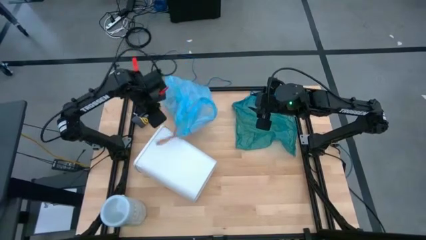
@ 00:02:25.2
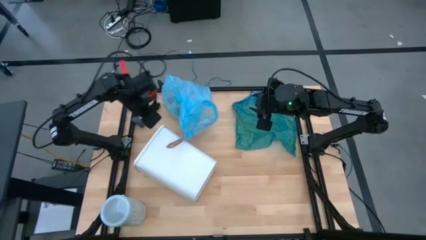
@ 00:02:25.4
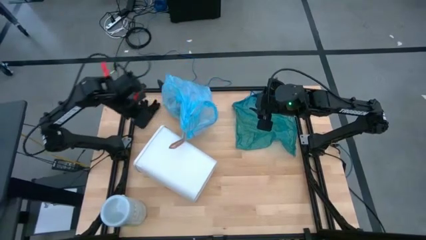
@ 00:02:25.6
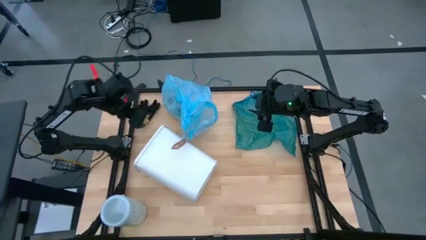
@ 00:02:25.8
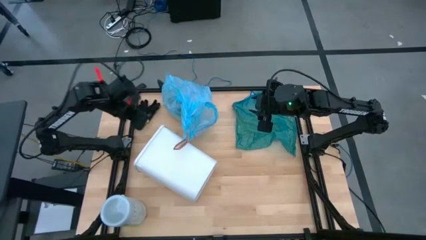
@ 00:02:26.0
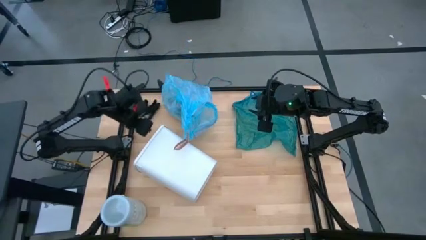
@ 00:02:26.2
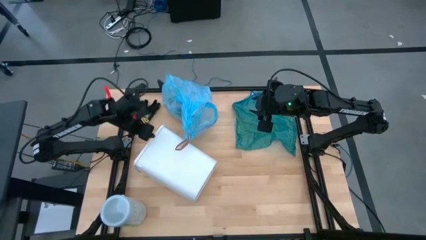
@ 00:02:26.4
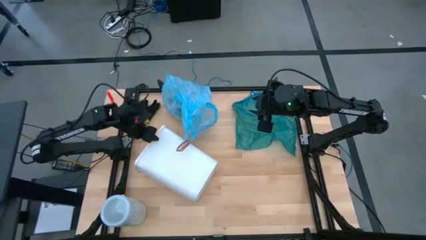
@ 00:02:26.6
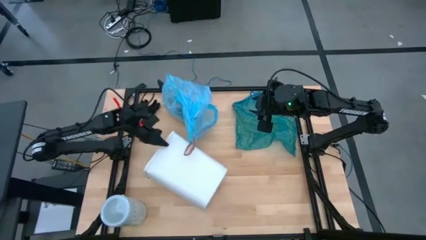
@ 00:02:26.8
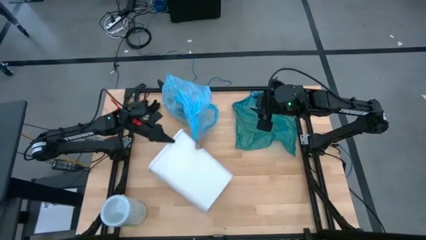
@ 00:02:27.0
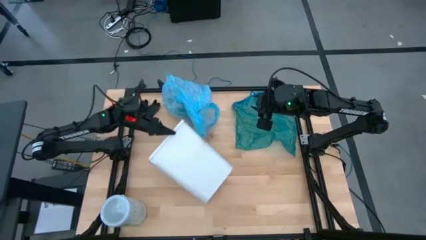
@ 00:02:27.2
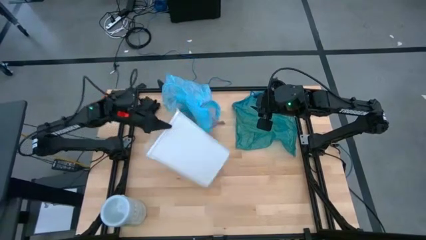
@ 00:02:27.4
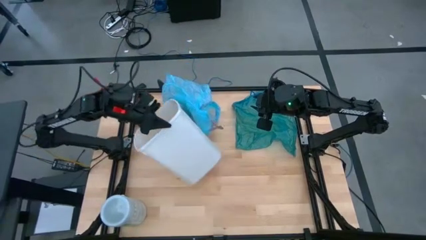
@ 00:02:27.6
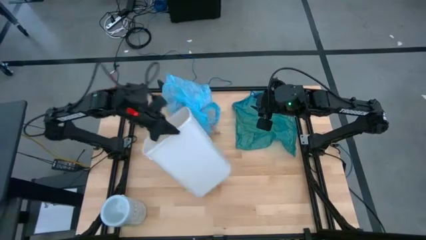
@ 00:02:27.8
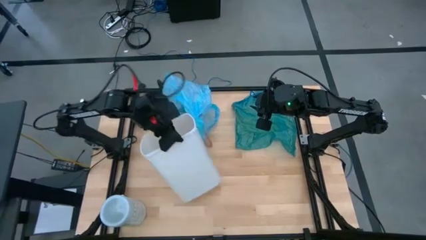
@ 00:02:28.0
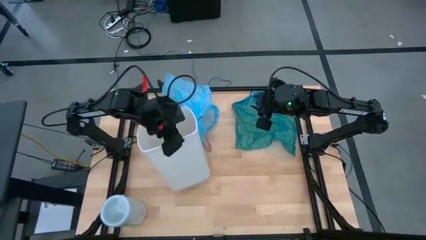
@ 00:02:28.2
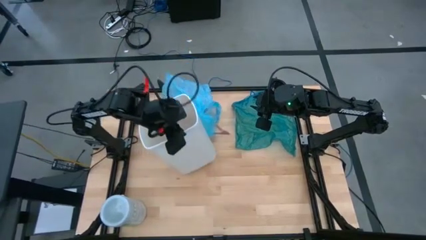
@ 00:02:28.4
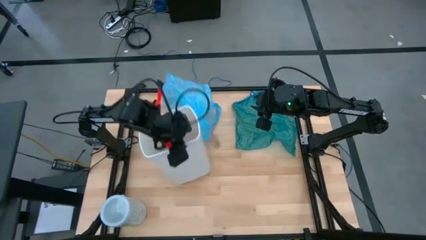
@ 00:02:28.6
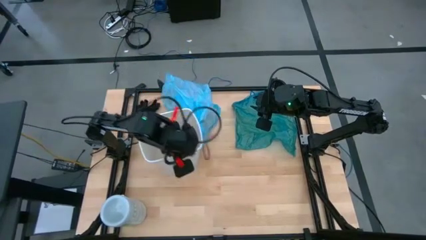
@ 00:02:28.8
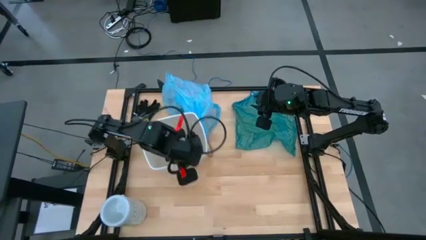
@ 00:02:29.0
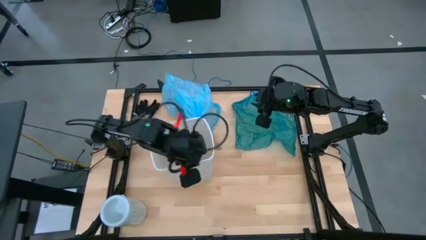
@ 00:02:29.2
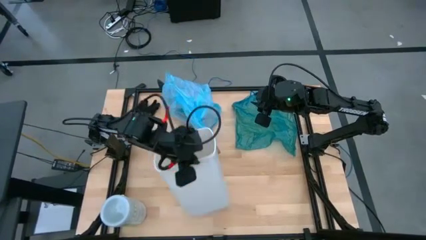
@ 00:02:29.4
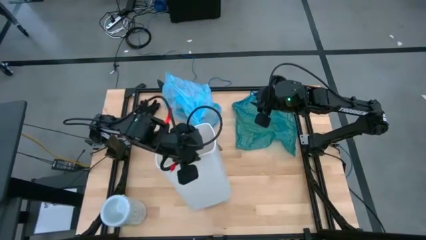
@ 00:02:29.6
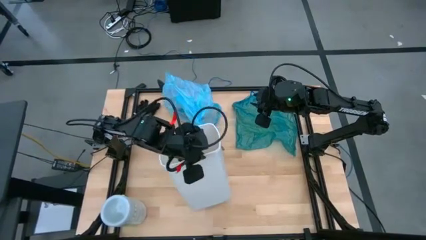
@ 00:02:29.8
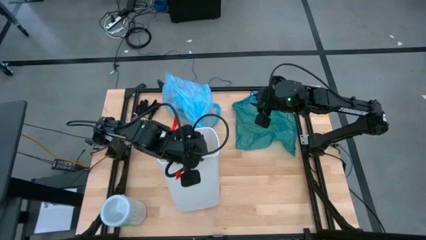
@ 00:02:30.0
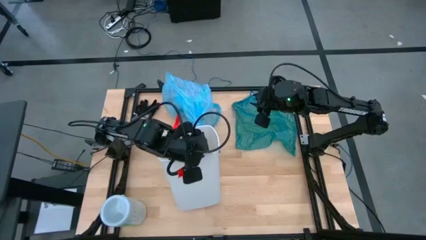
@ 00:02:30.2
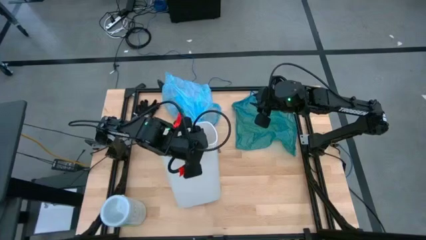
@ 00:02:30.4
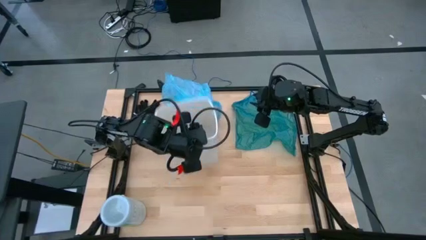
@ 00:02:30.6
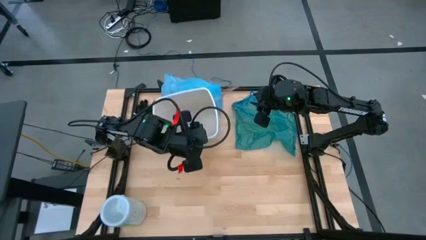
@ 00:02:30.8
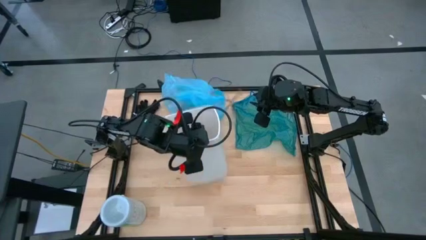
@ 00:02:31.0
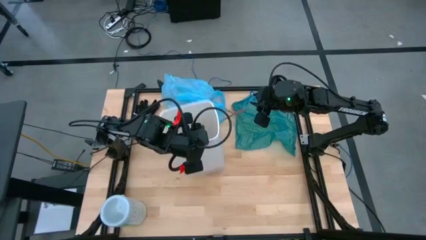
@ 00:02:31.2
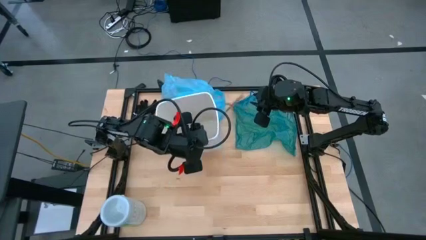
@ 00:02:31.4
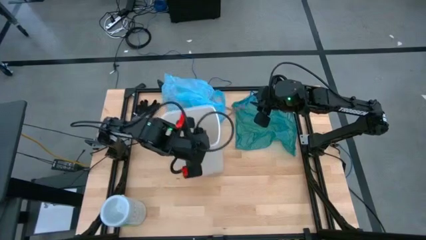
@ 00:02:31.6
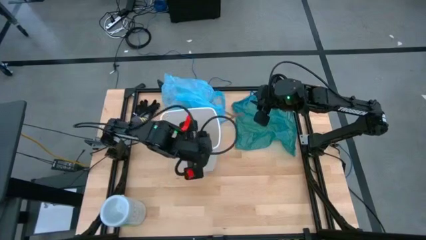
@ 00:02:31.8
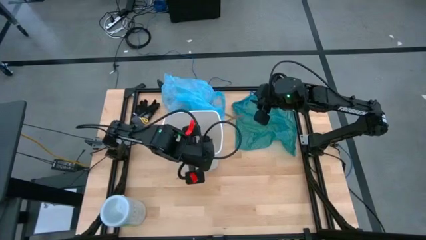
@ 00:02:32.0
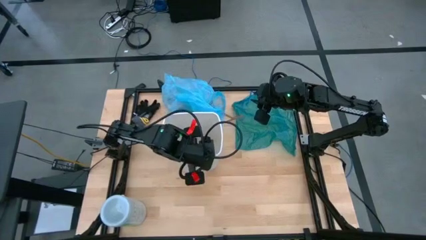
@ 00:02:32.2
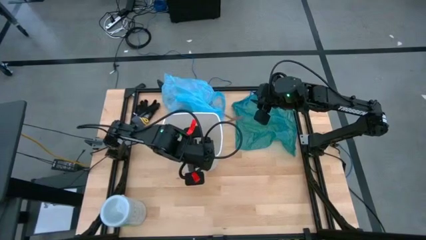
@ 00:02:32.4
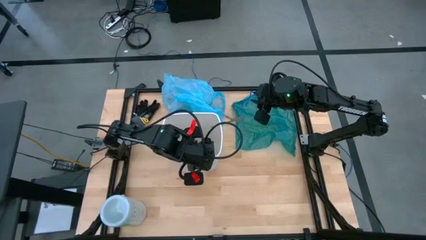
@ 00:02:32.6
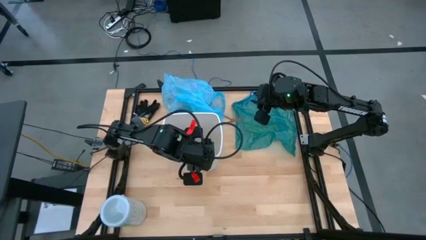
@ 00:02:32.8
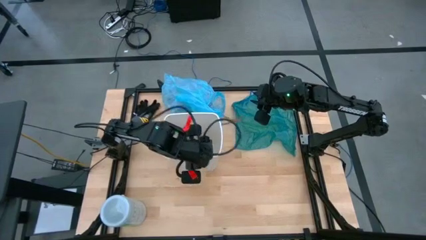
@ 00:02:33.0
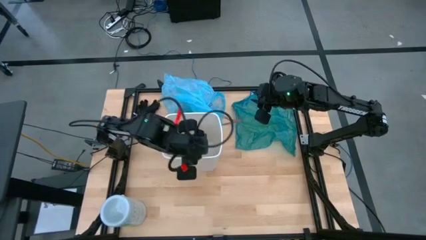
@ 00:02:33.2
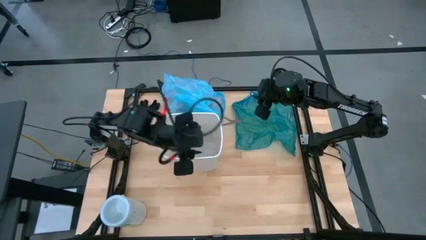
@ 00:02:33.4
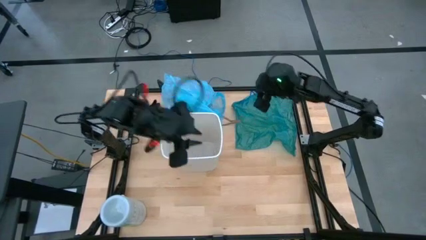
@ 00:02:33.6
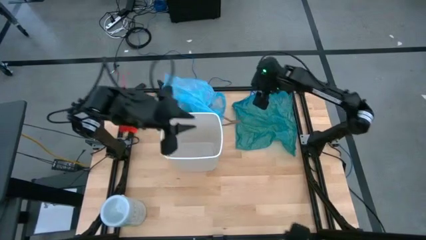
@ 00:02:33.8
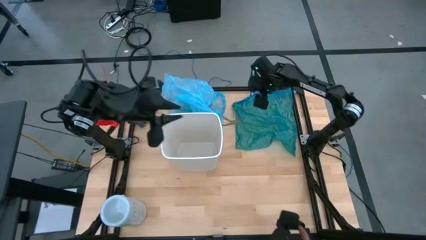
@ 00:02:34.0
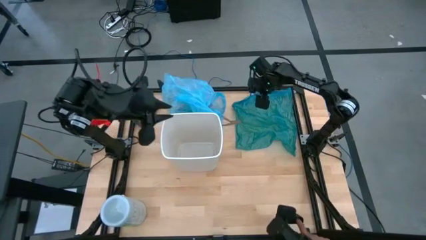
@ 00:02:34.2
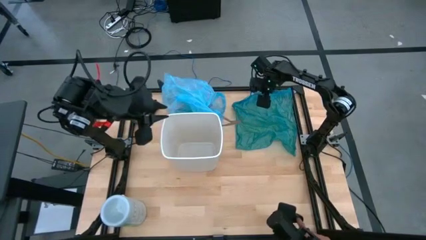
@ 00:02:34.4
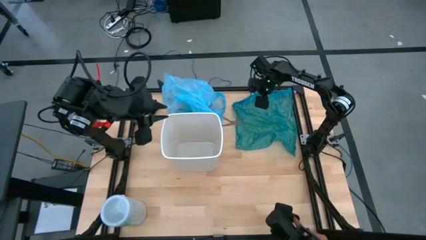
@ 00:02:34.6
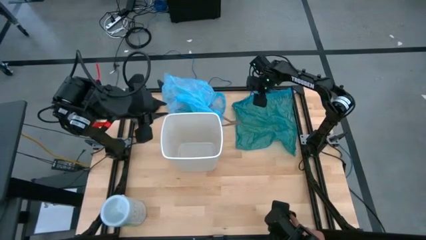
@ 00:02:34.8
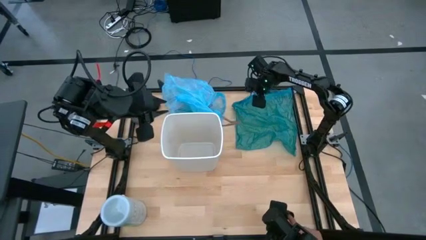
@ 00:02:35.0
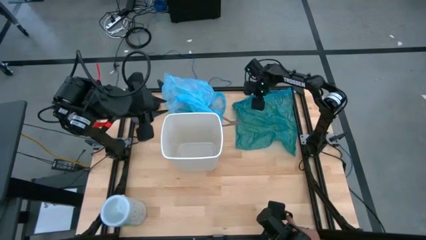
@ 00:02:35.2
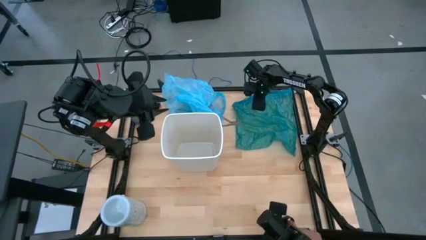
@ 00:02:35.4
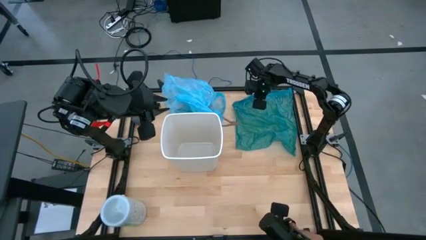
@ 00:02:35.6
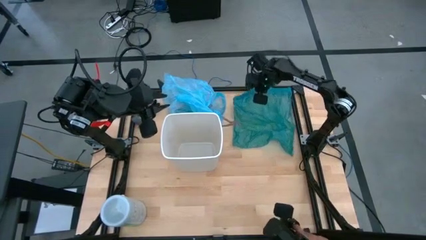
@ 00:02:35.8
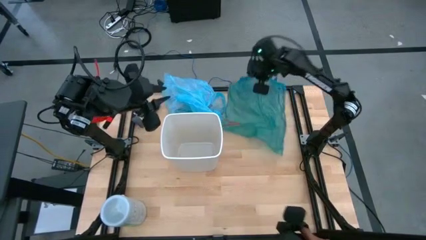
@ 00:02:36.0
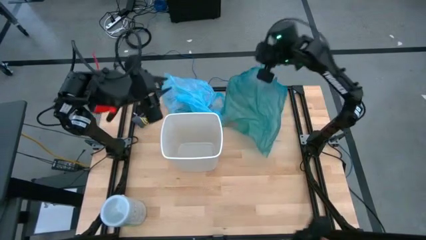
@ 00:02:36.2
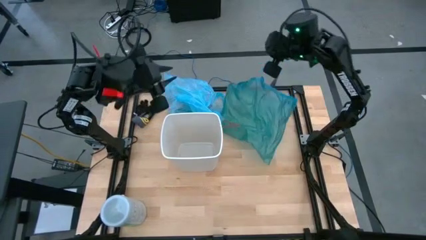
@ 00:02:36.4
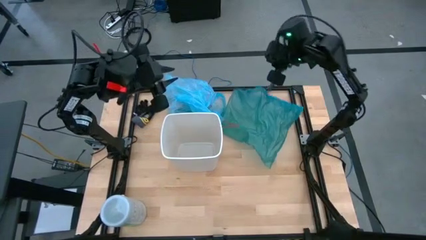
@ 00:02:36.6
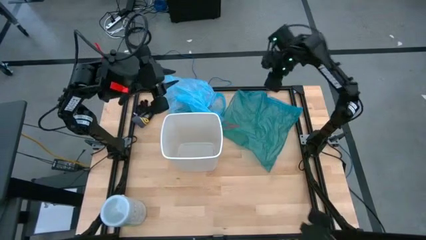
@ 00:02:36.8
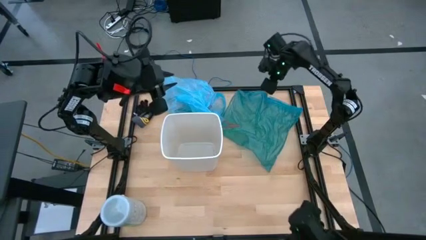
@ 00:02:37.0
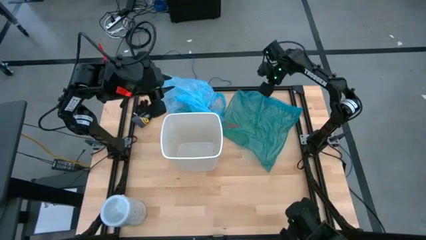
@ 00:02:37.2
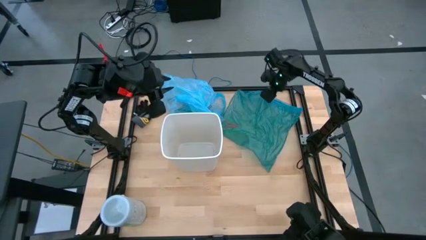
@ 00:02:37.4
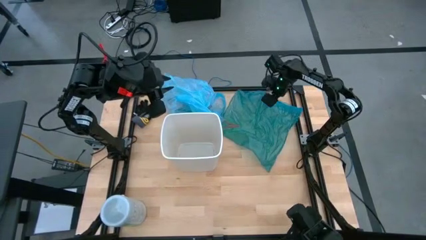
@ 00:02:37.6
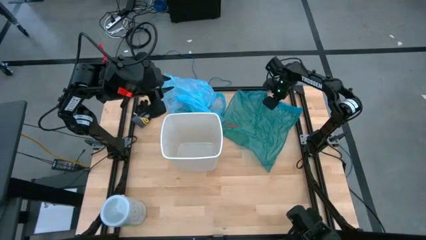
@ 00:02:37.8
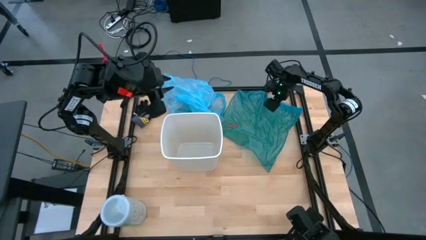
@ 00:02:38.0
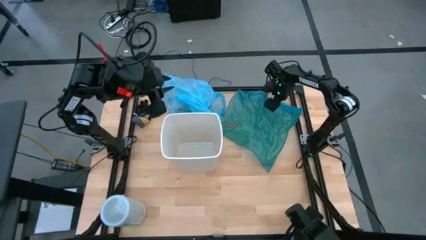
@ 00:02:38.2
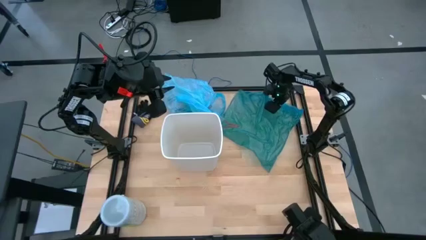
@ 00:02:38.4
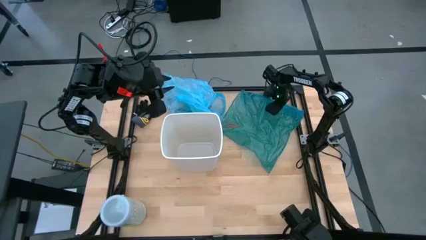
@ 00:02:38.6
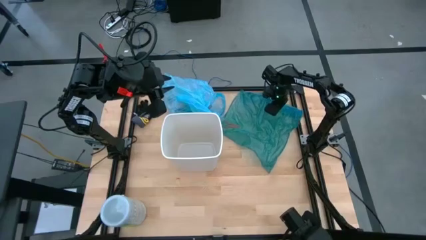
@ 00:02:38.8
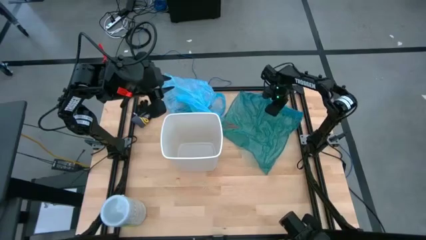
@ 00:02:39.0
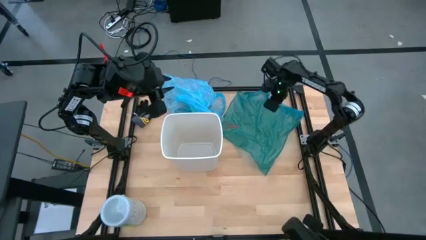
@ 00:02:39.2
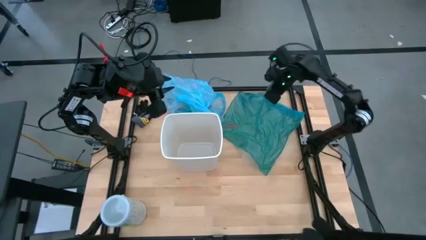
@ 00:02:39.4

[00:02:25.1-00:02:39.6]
Task: place trash/remove bag and relplace
Insert the green plastic trash bag into the trash bin
